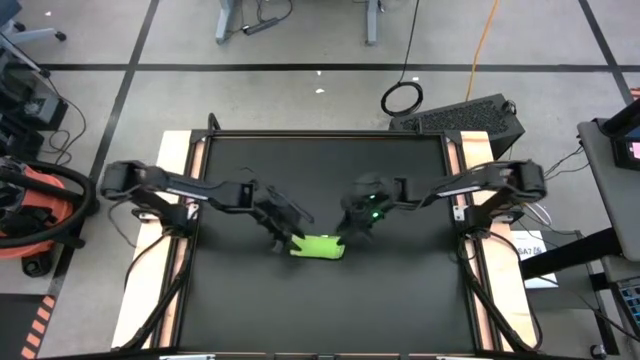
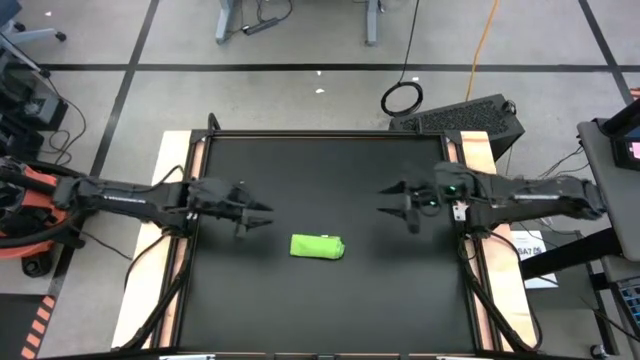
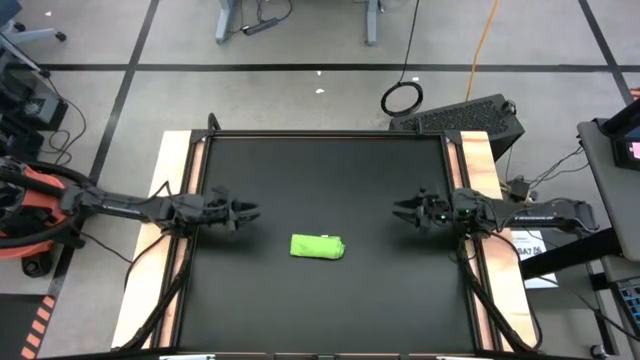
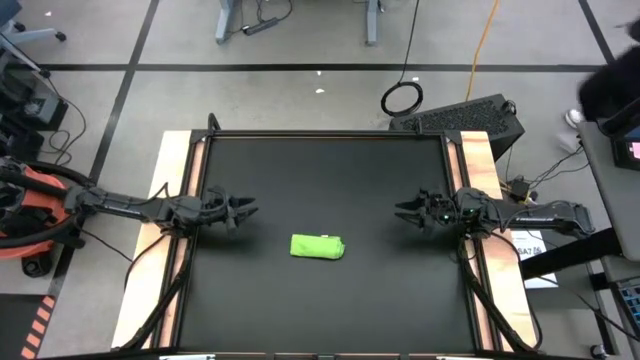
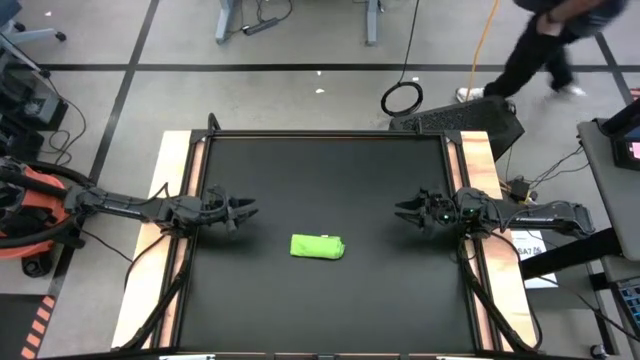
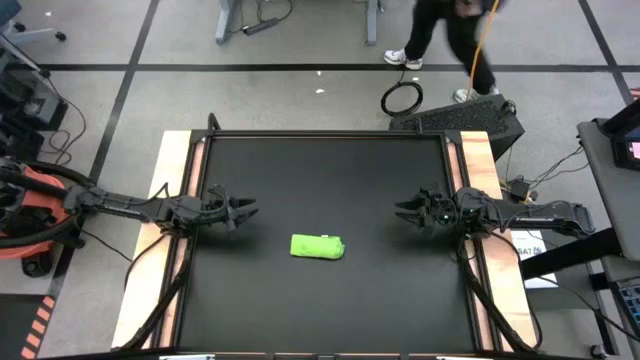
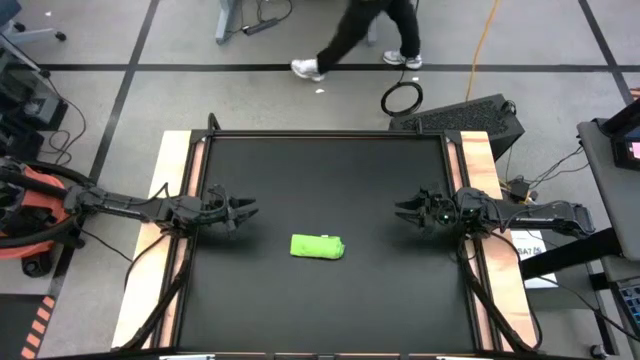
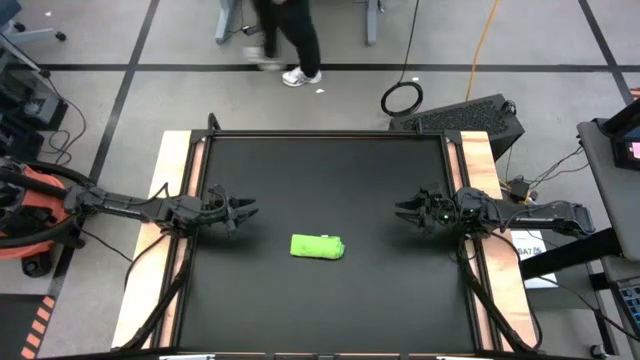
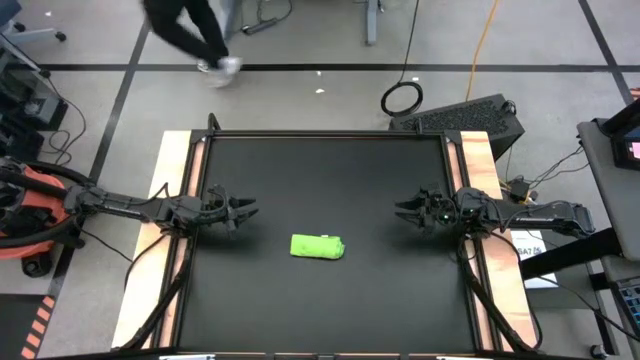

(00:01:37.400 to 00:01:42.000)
Task: Roll towel
Return to Home Position

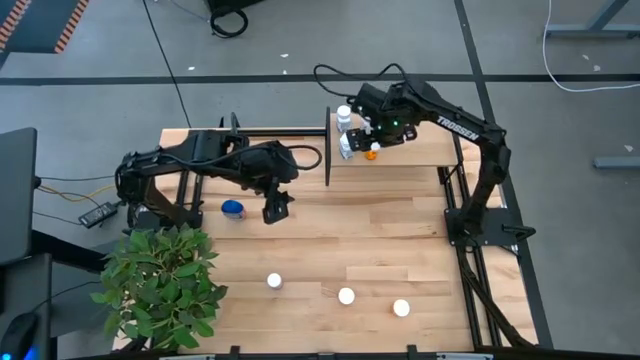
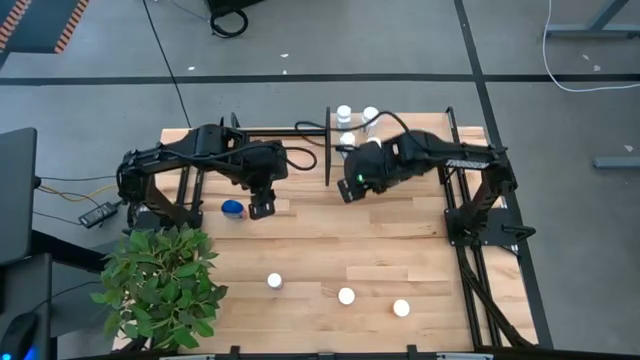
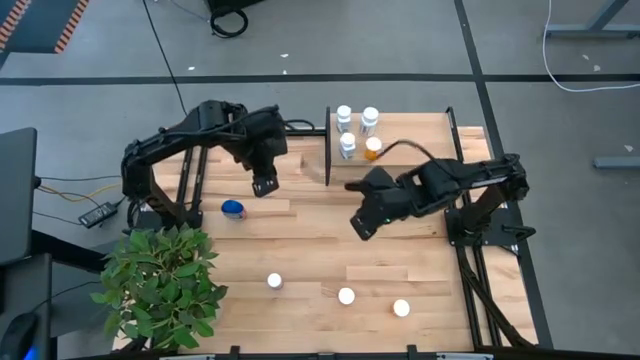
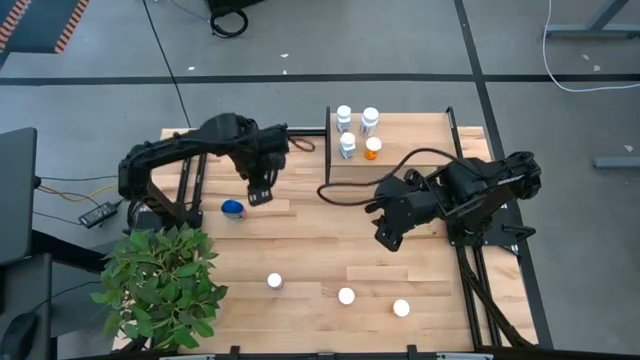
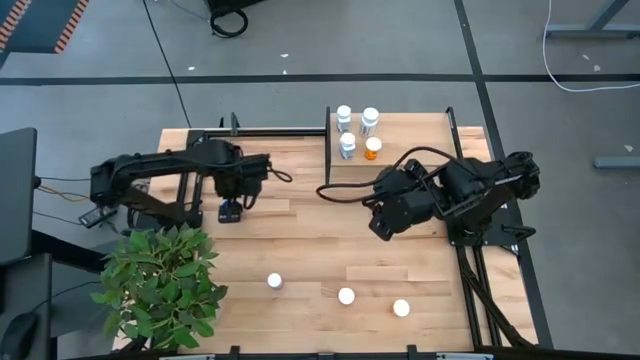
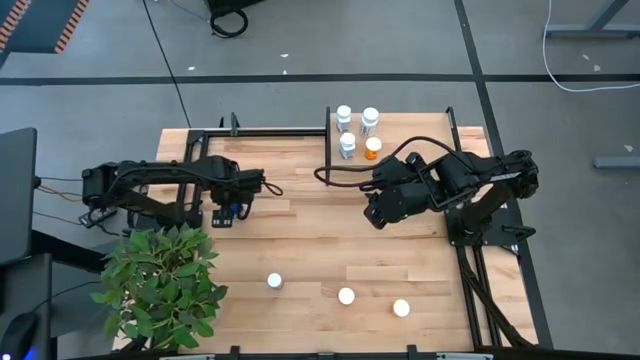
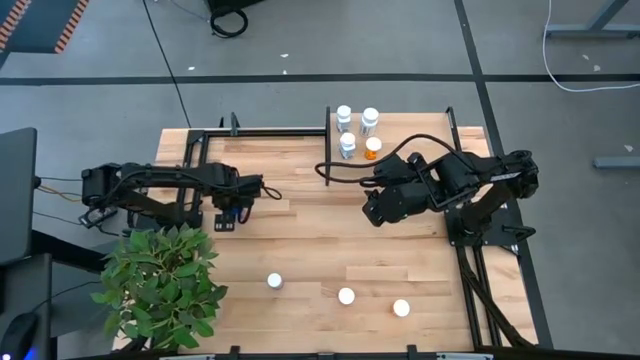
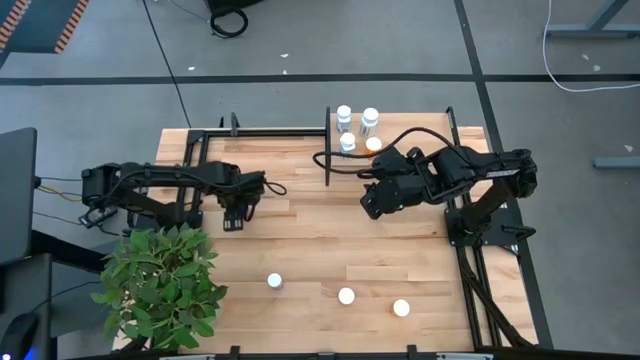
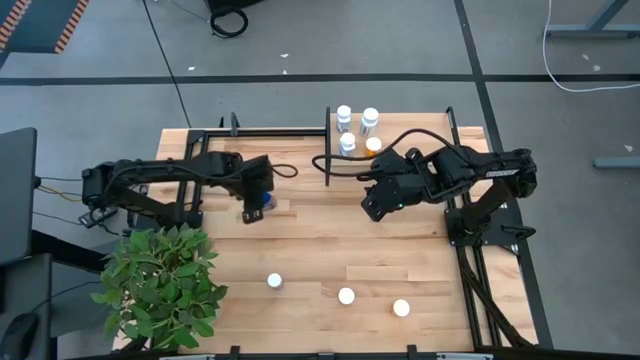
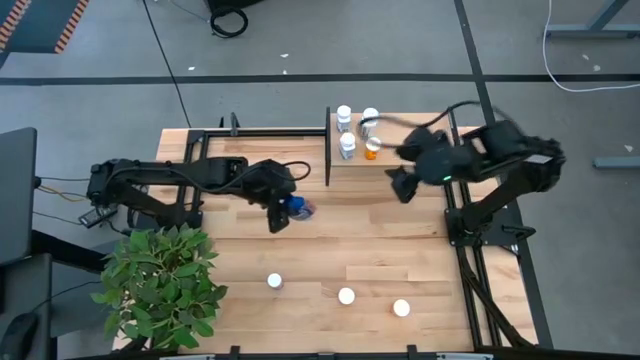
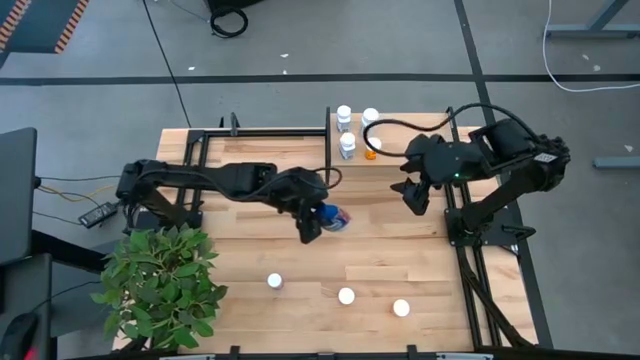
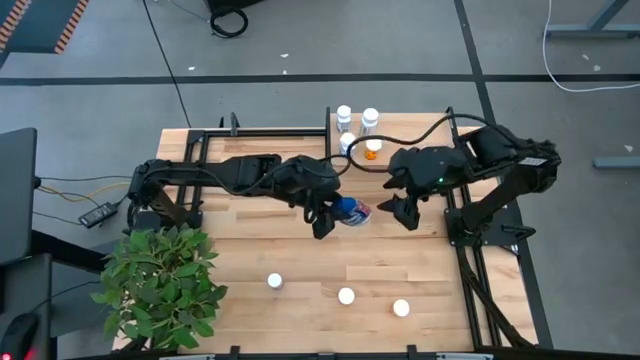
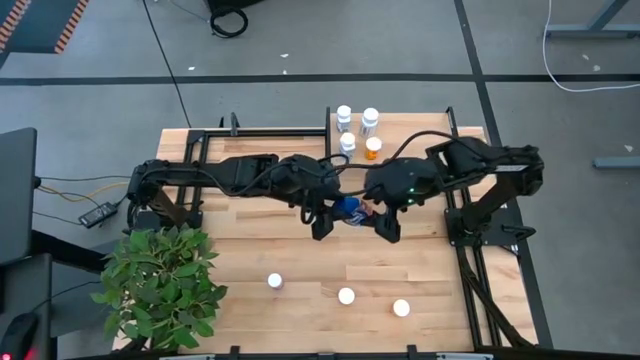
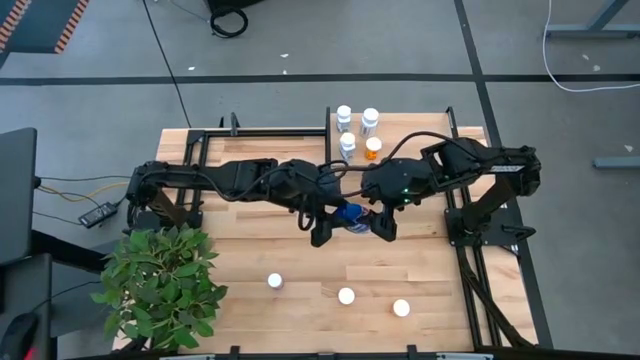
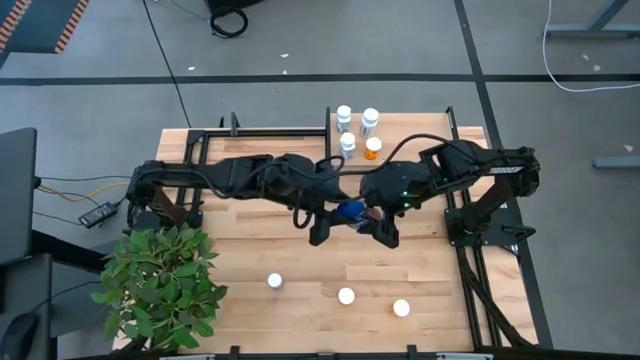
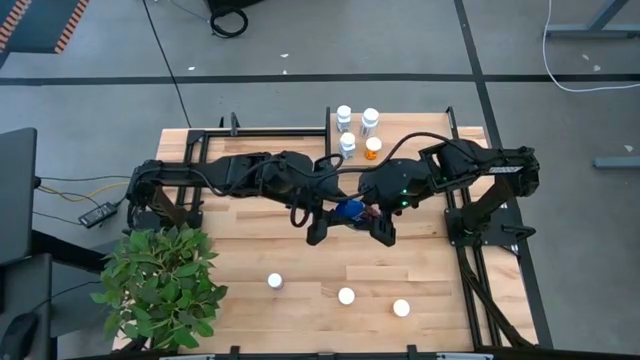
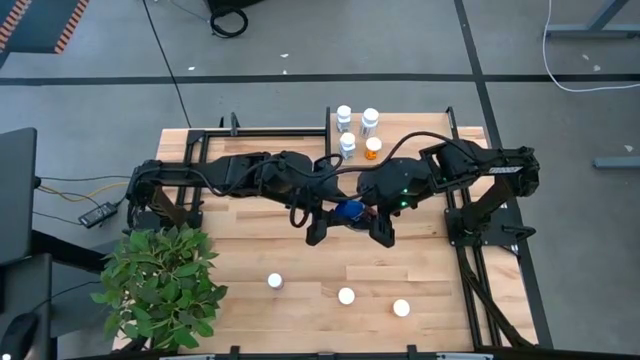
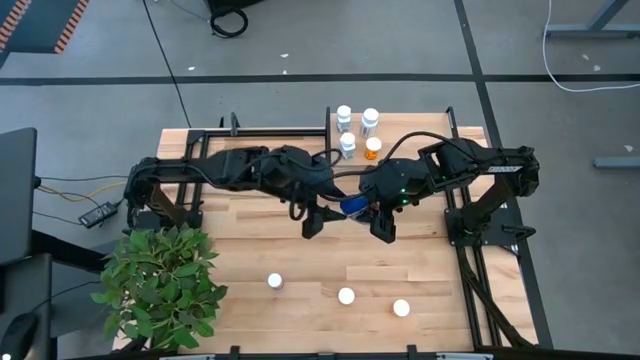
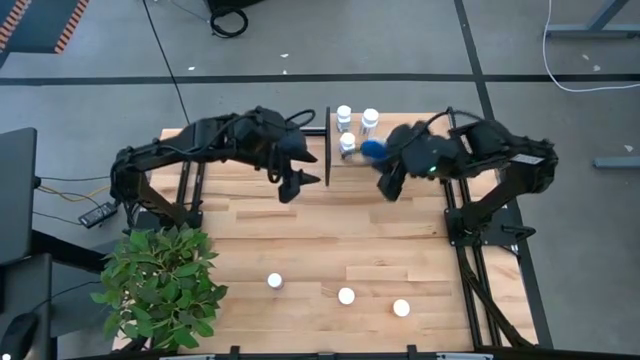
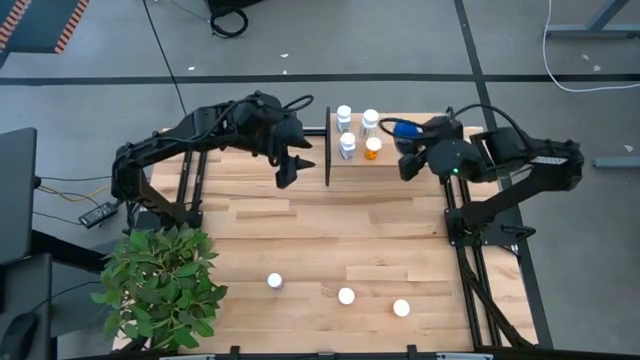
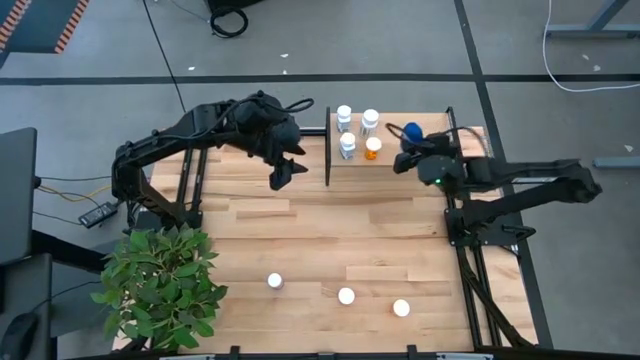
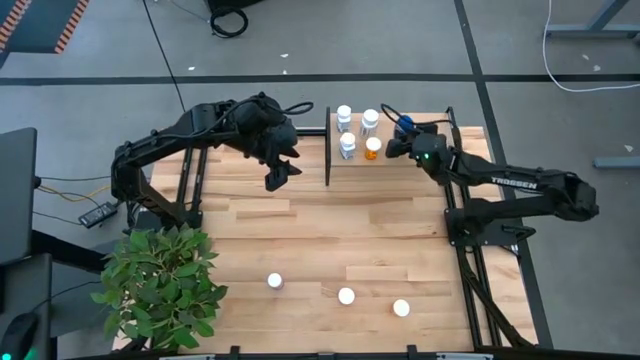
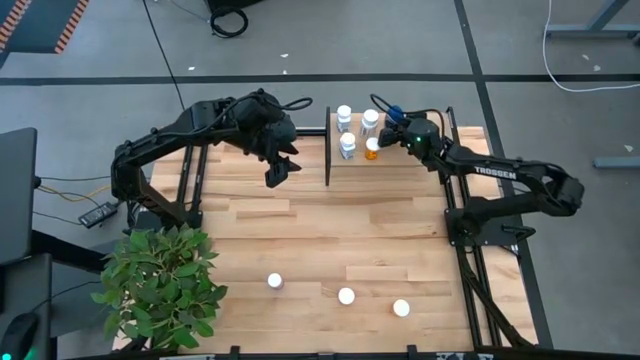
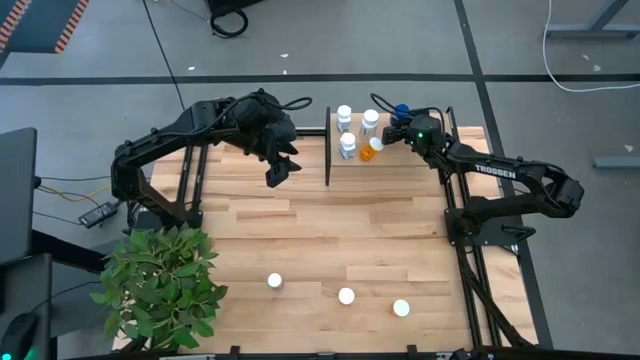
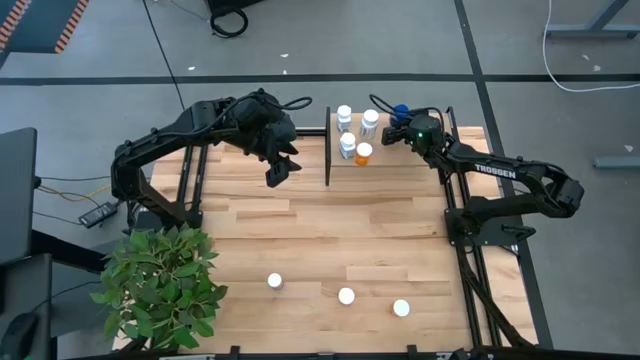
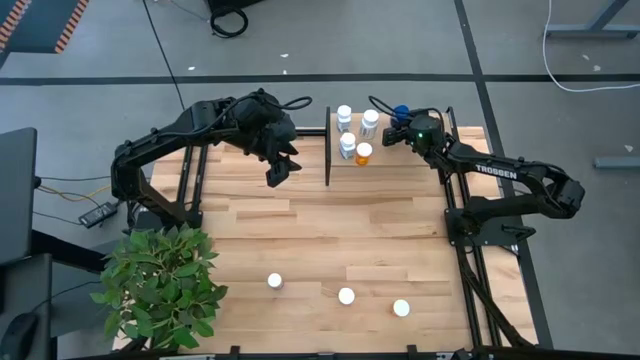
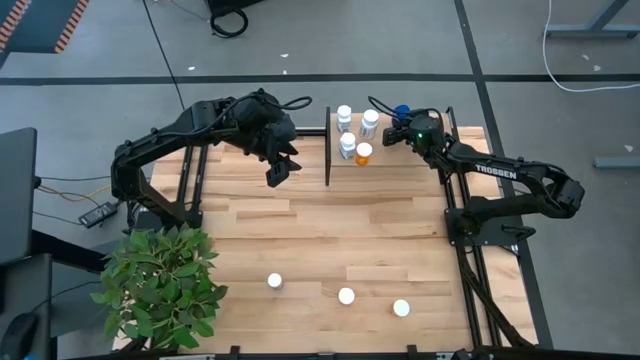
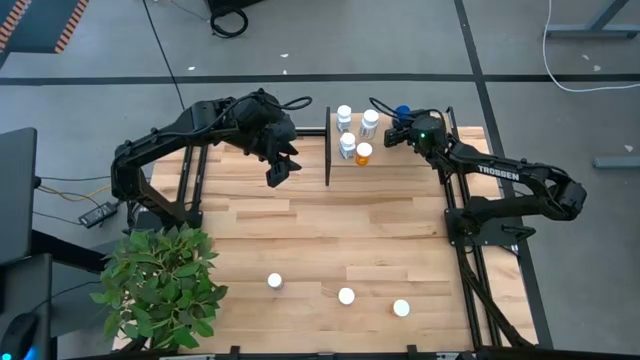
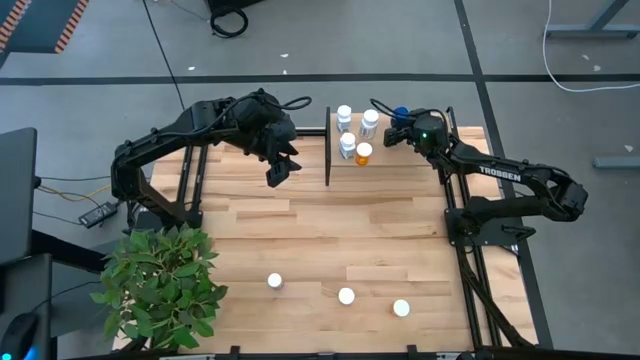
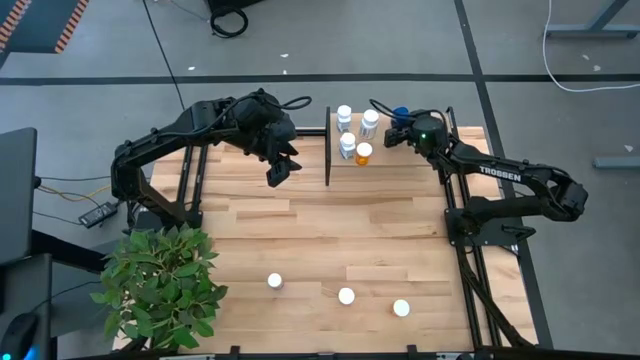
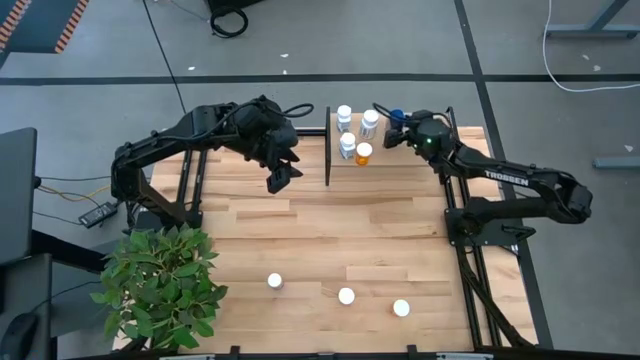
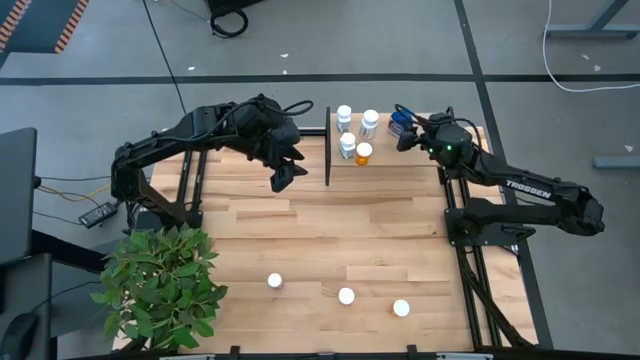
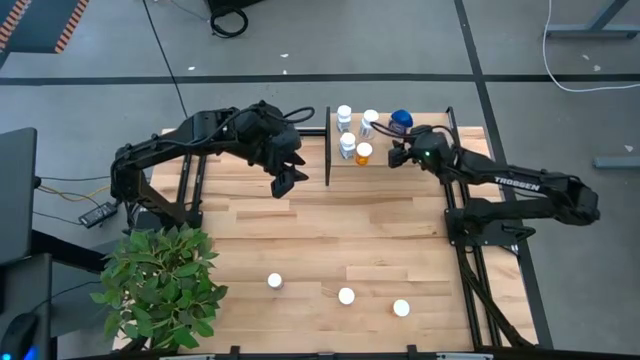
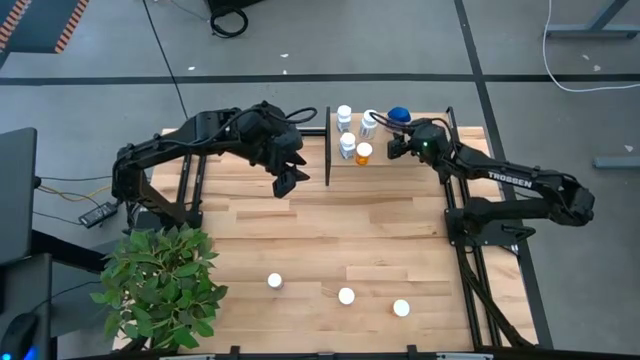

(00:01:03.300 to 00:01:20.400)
Task: Pick and place medicine bottles onto shelf by color
Put the blue gummy medicine bottle on the shelf
